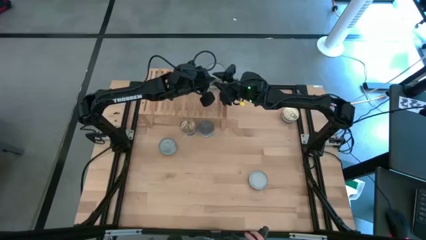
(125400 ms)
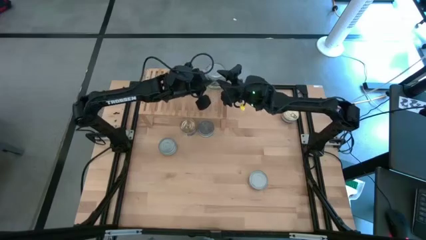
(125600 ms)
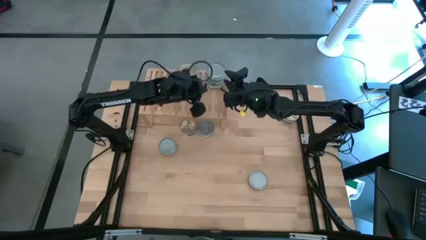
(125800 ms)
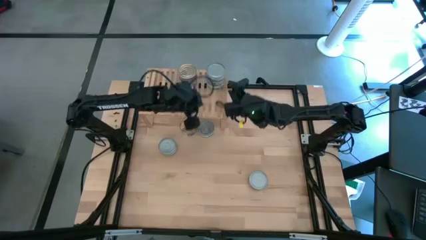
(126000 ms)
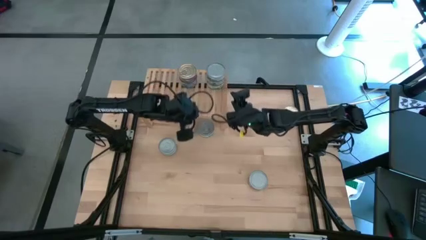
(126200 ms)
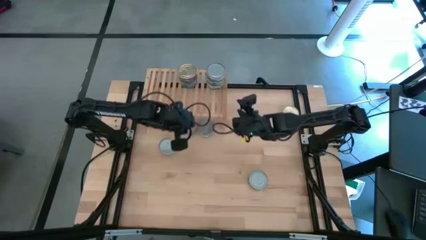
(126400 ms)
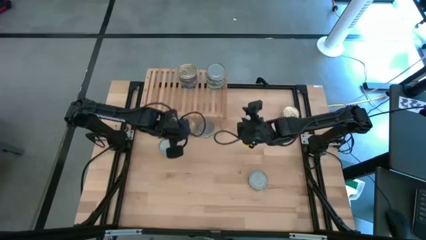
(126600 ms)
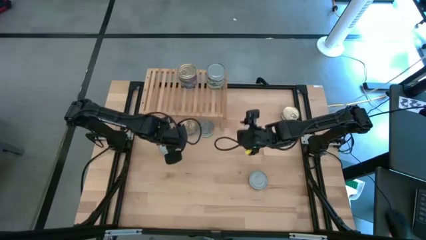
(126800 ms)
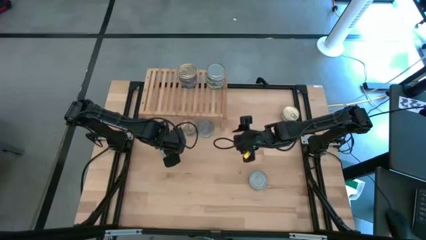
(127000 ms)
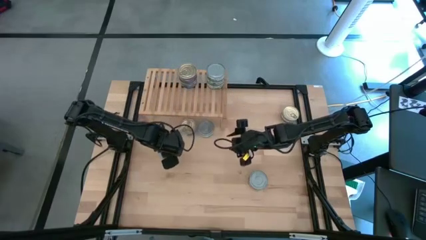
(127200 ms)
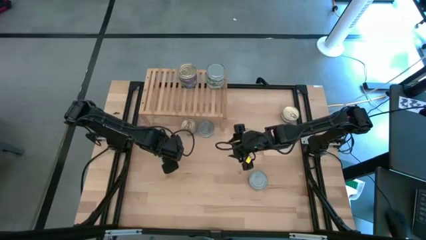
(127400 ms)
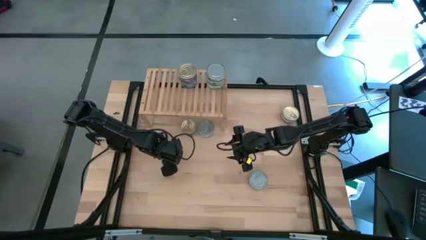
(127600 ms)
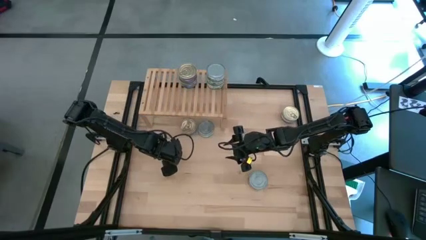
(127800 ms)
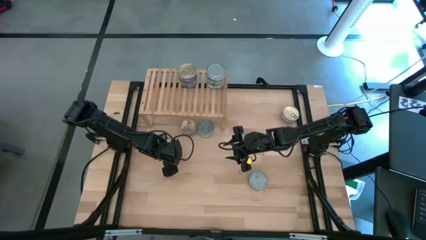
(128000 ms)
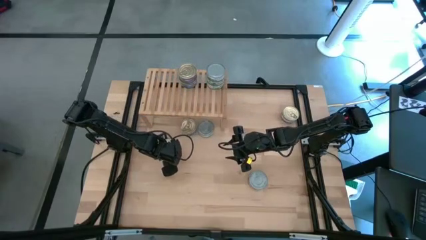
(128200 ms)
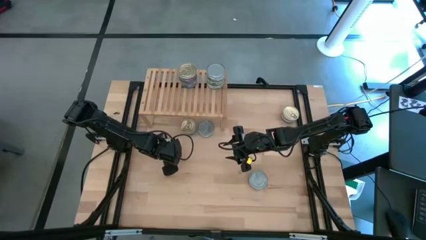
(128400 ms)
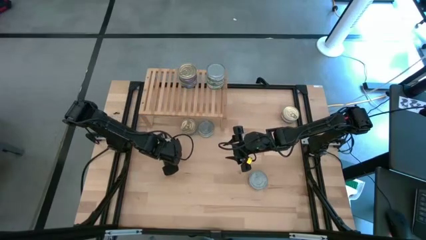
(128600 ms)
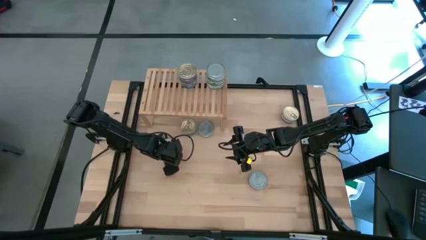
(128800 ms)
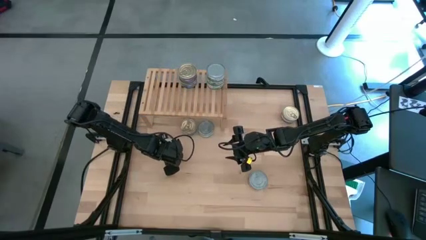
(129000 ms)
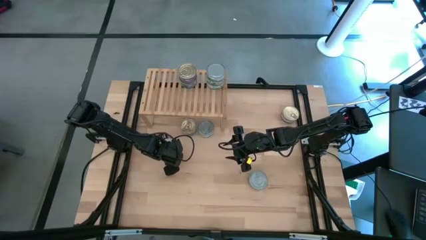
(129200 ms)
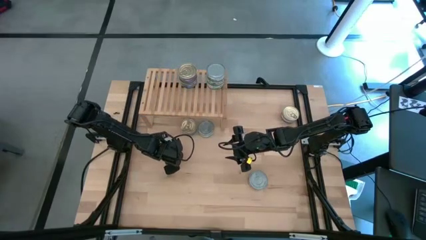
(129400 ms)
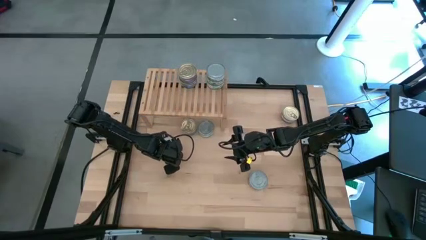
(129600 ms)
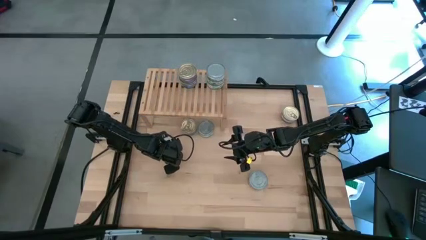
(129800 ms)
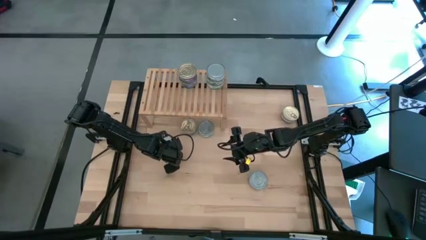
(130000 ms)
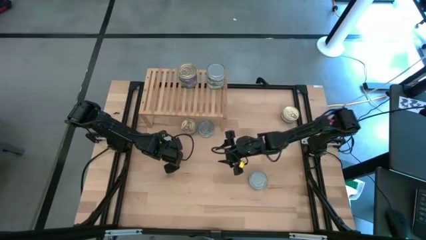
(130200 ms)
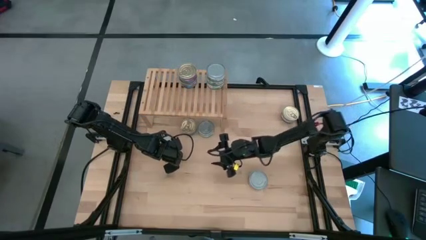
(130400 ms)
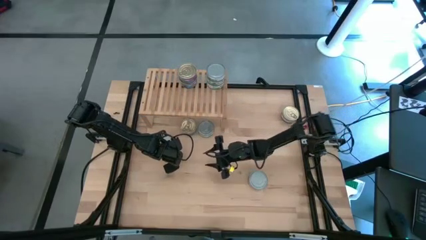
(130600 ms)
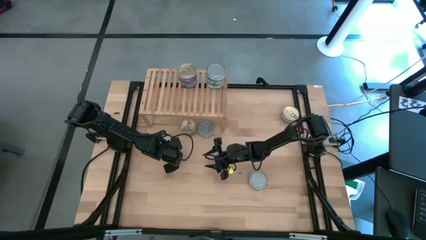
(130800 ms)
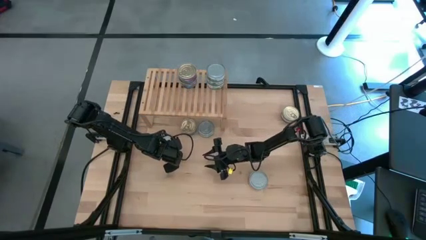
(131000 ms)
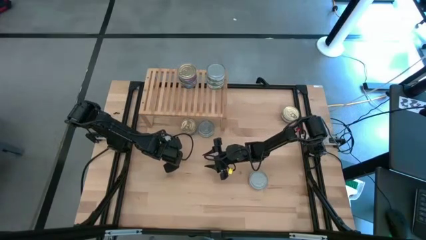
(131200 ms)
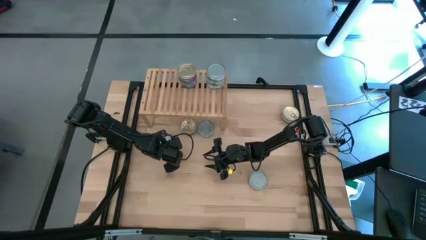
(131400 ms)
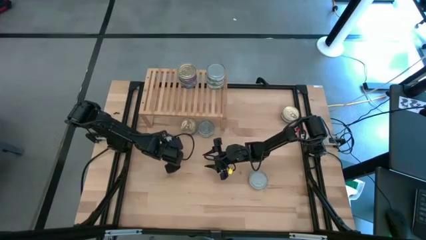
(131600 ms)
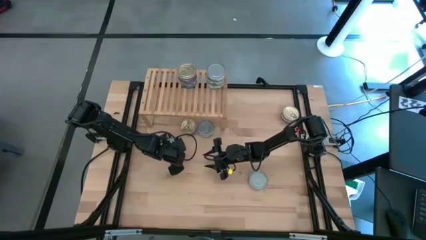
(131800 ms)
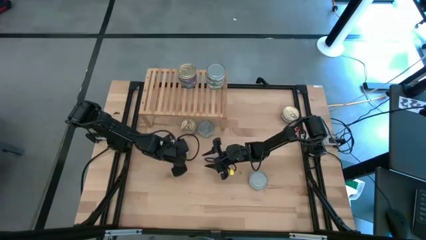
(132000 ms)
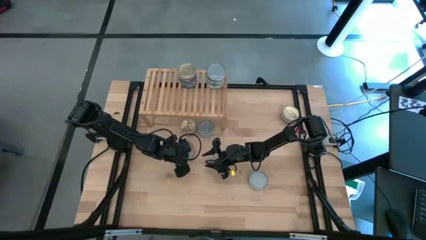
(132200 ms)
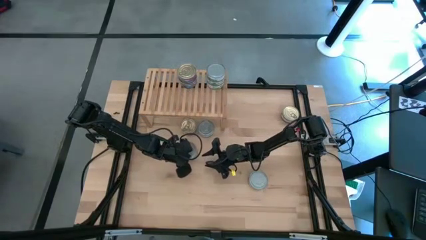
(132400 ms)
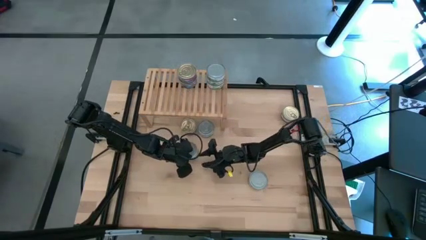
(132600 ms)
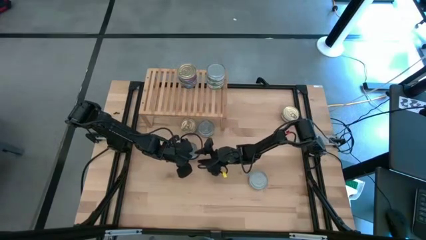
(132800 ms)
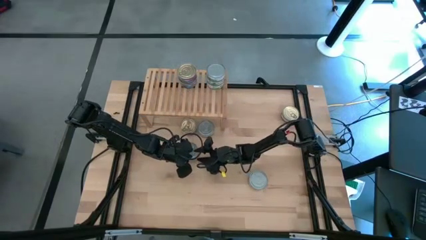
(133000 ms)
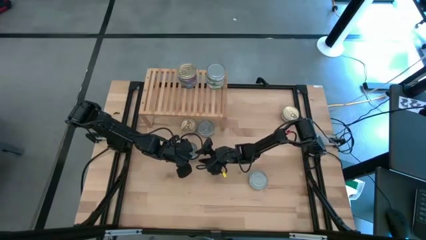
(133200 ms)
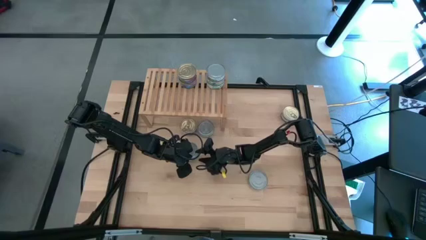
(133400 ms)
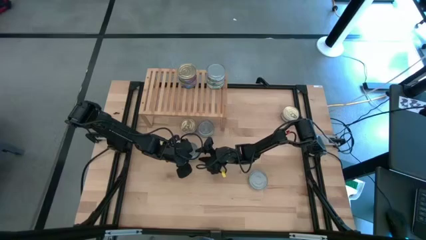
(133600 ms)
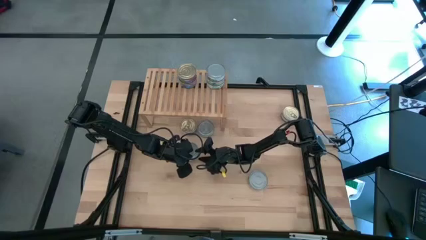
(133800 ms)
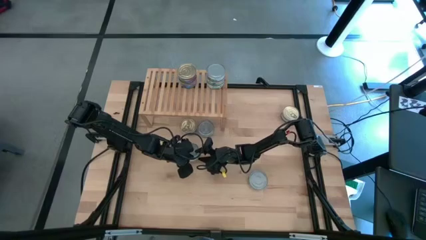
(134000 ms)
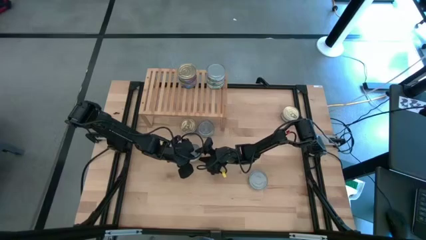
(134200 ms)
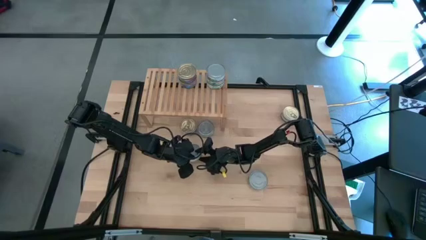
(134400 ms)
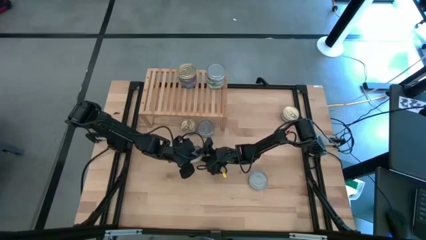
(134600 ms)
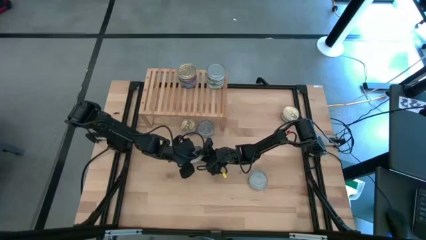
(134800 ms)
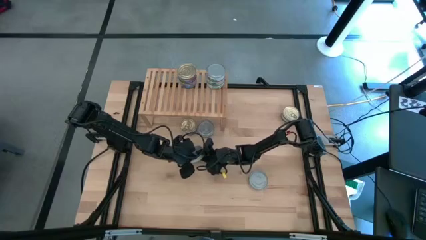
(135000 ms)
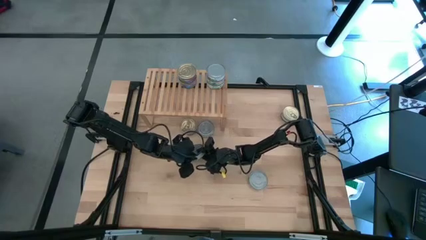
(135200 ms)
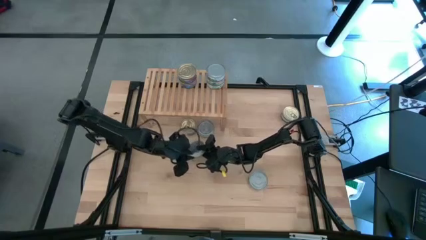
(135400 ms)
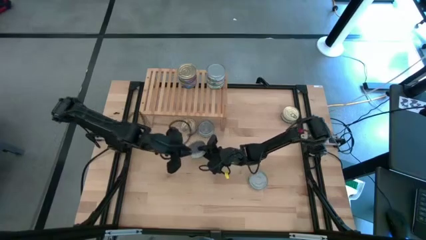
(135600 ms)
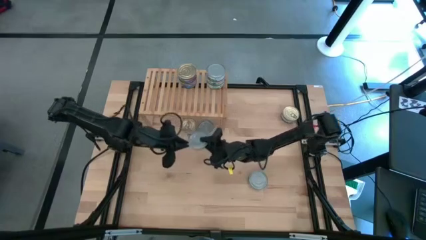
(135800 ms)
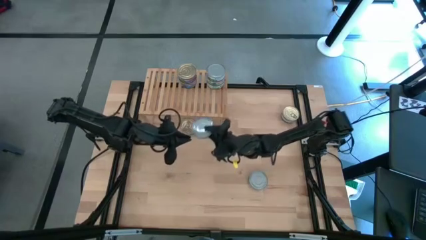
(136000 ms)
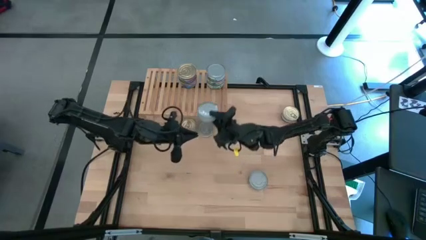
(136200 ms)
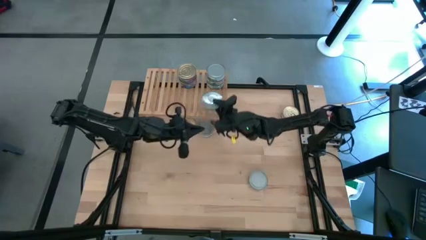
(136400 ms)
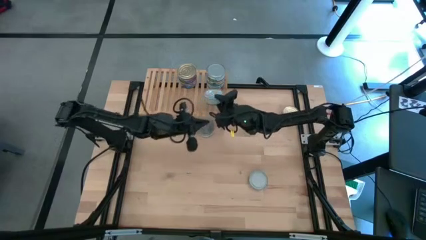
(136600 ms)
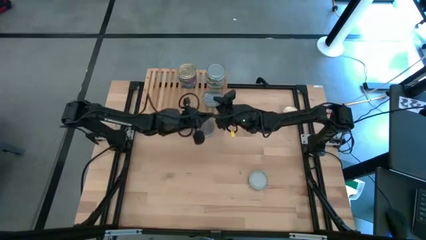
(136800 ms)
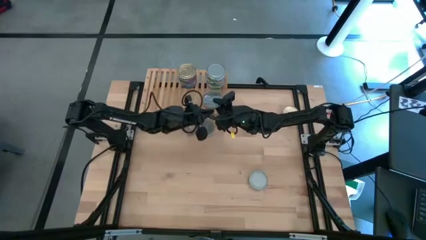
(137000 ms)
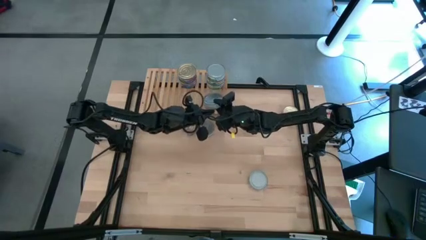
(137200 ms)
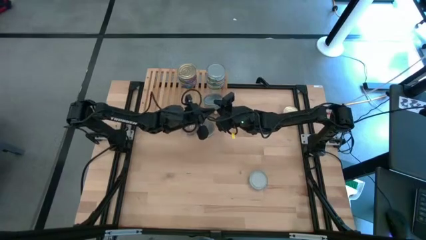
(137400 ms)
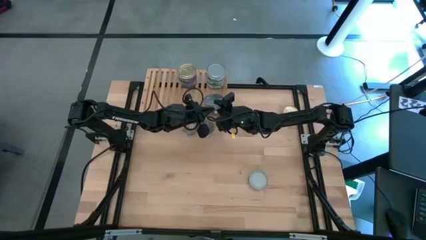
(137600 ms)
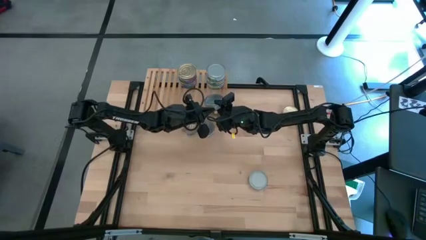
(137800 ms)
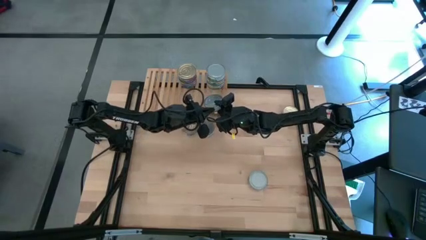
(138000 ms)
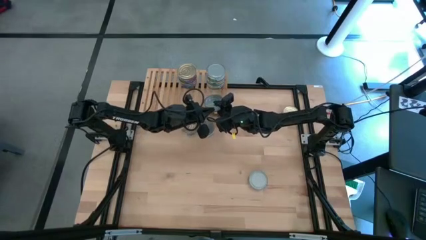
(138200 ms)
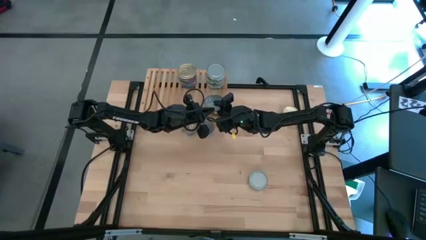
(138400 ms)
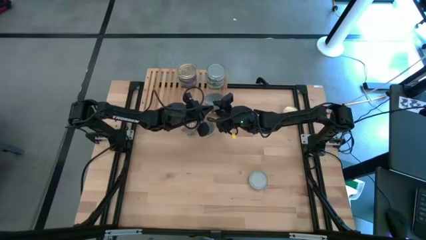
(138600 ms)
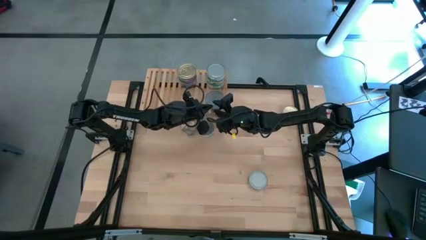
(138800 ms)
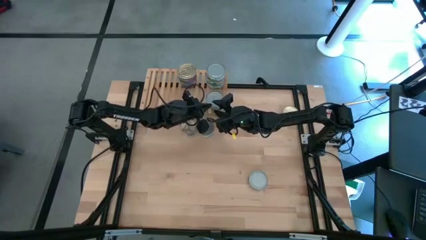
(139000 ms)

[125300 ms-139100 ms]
Task: Stack canned seafood by type on shelf
Put the green tuna can on the shelf and align it with the other stacked green tuna cans

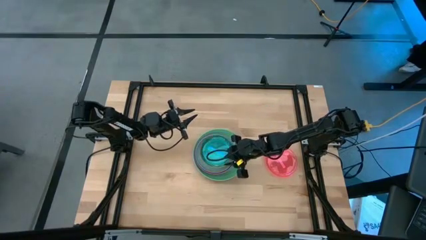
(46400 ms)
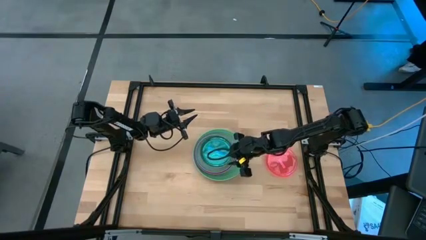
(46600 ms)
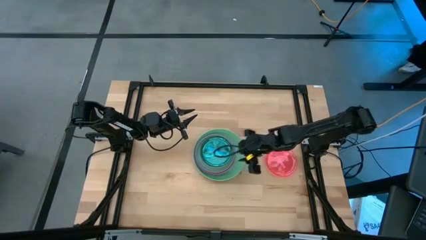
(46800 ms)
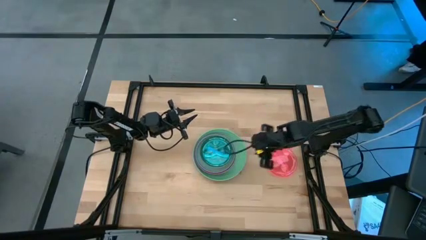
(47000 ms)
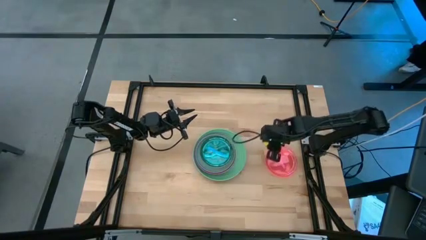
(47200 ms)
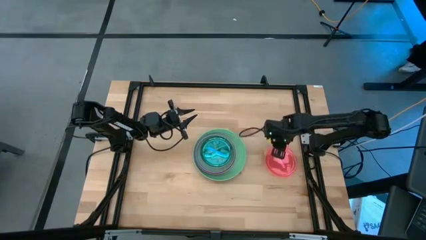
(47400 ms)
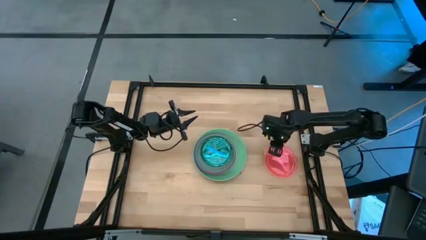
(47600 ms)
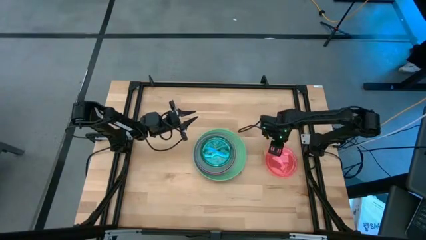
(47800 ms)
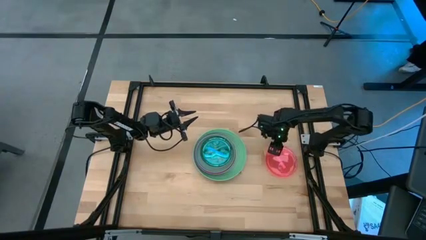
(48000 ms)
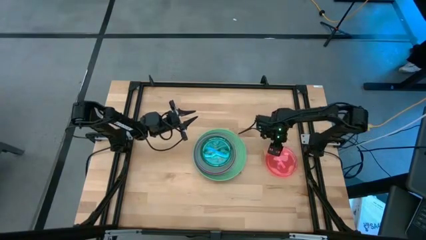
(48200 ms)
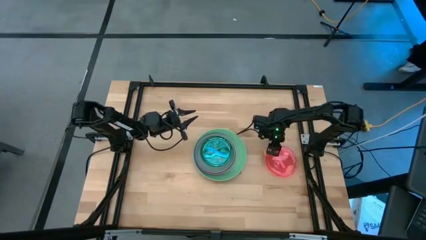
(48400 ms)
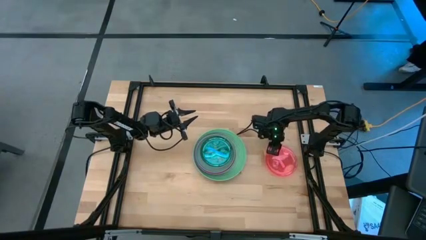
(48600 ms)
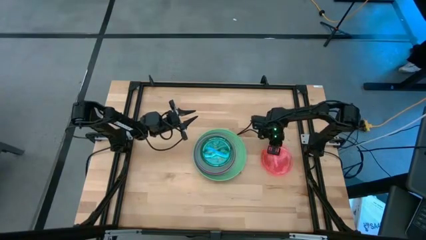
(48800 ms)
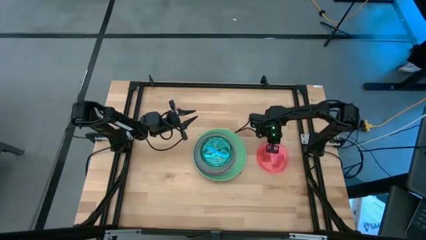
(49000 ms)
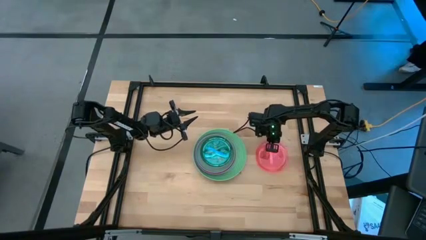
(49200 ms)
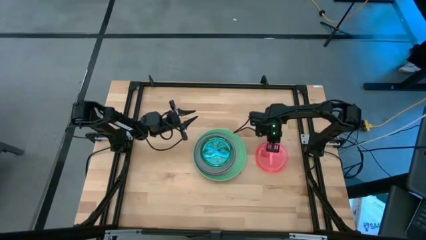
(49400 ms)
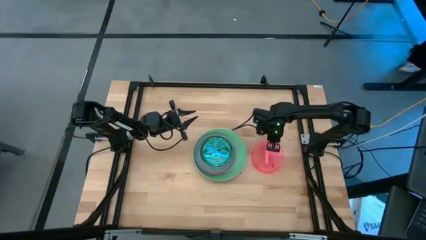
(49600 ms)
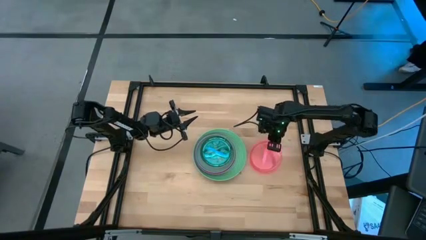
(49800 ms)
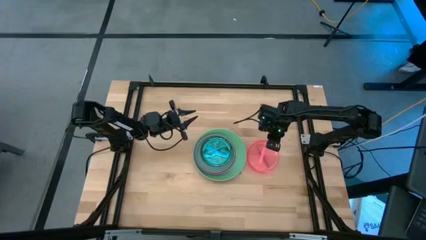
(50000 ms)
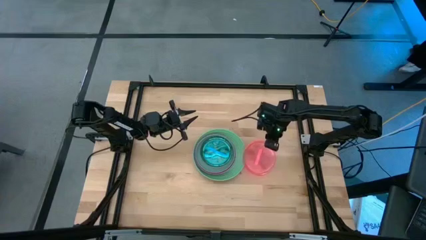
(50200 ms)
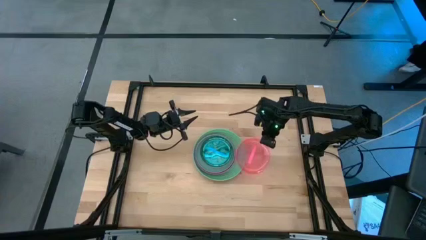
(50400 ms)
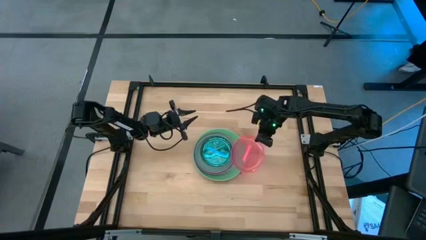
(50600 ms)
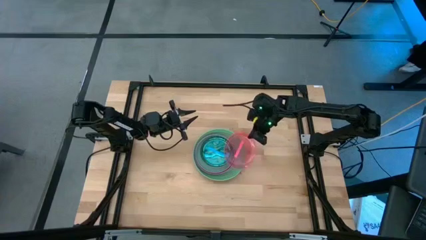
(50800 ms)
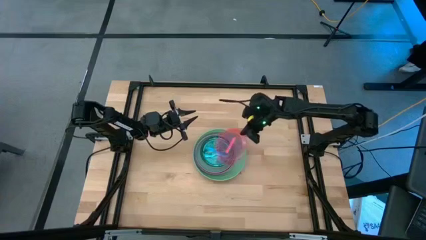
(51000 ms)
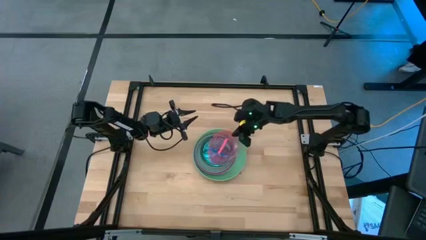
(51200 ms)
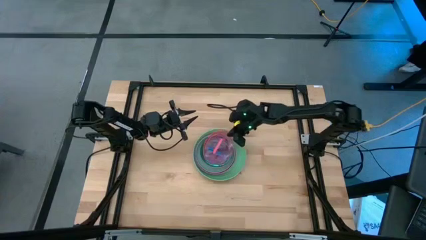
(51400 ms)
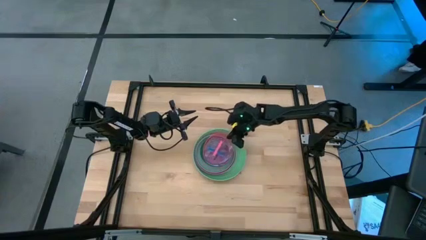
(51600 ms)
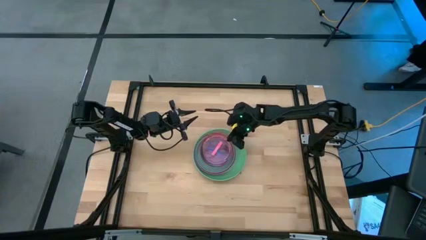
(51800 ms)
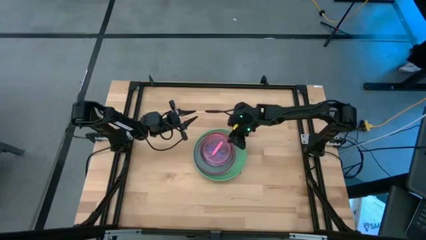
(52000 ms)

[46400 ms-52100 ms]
Task: Stack plastic plates
Stack the red plate on top of the blue plate
